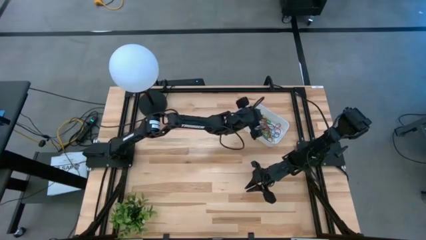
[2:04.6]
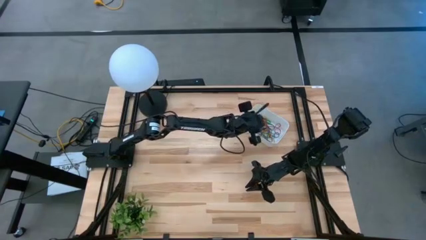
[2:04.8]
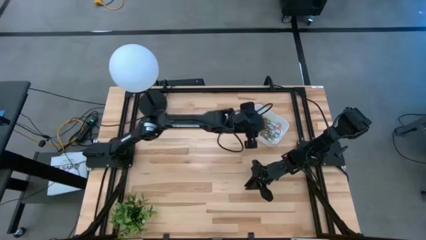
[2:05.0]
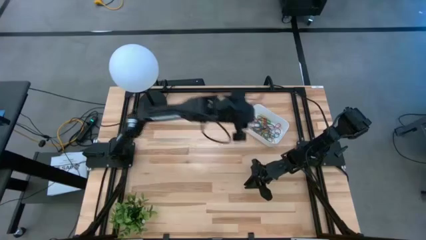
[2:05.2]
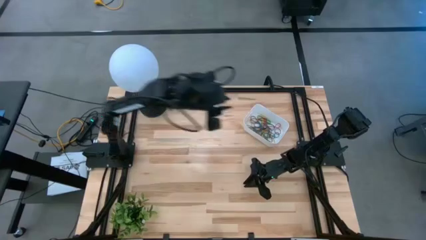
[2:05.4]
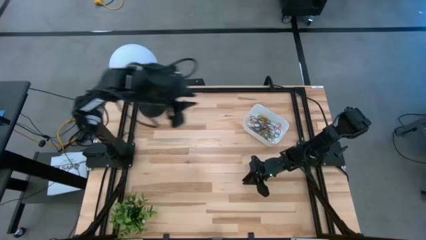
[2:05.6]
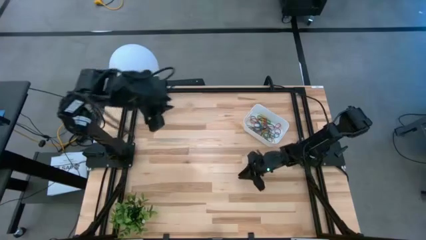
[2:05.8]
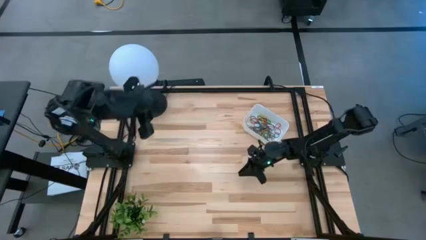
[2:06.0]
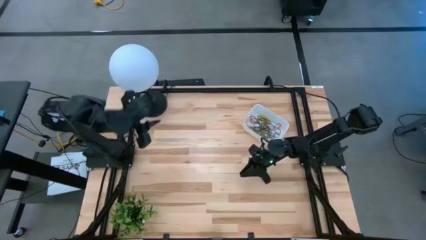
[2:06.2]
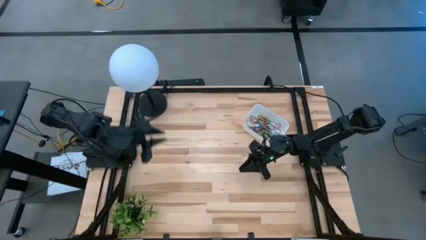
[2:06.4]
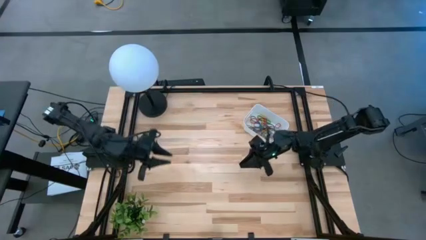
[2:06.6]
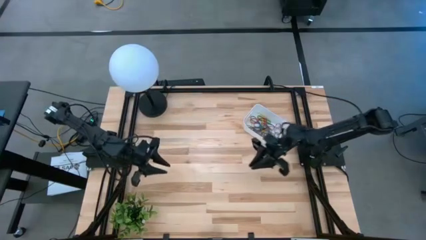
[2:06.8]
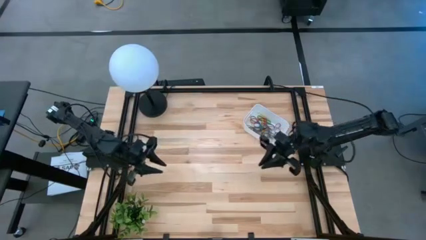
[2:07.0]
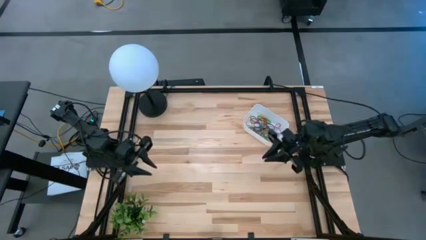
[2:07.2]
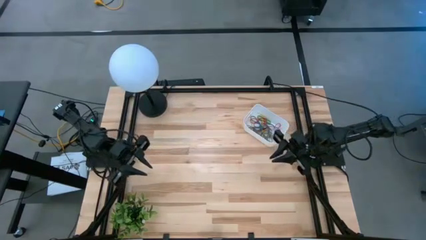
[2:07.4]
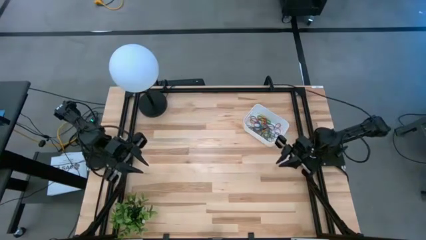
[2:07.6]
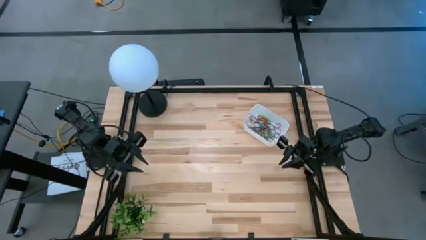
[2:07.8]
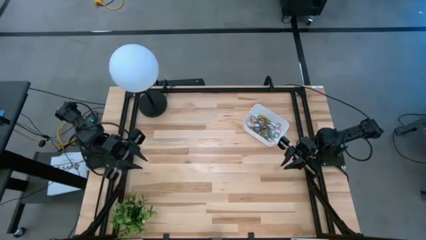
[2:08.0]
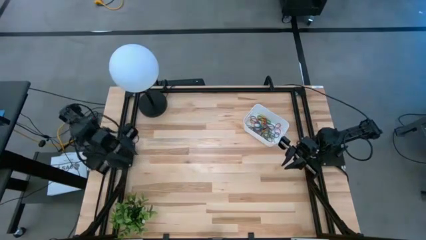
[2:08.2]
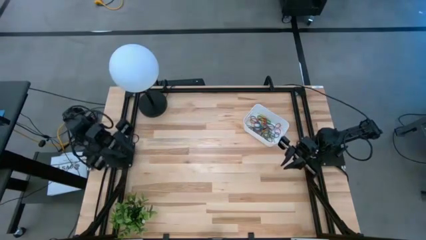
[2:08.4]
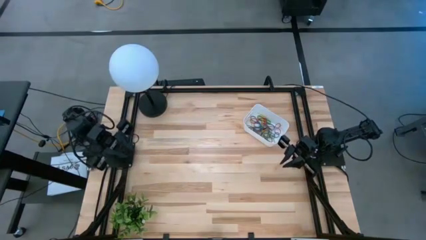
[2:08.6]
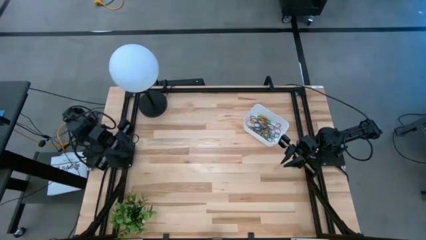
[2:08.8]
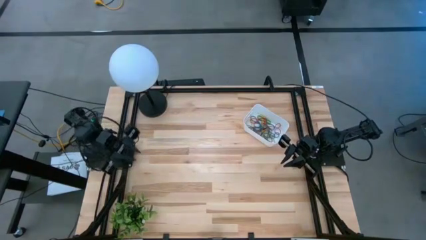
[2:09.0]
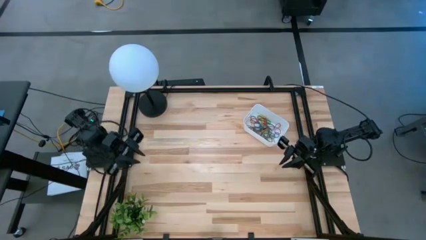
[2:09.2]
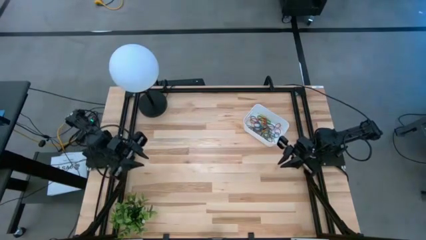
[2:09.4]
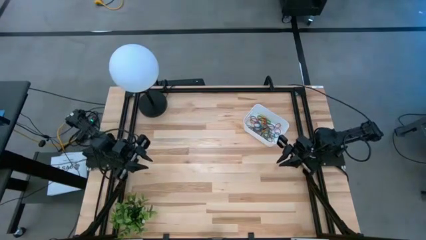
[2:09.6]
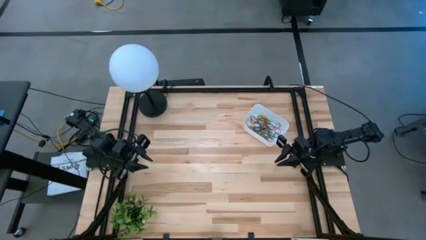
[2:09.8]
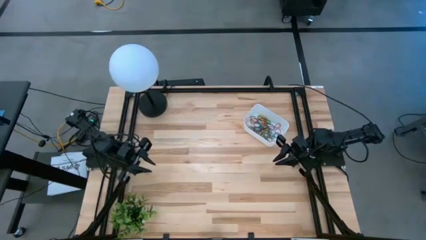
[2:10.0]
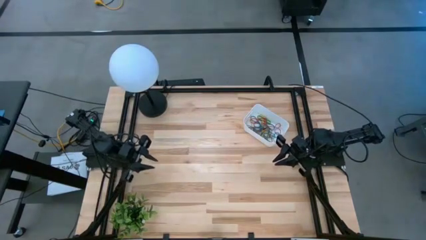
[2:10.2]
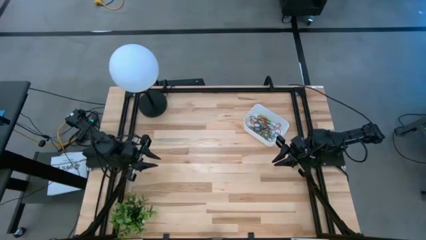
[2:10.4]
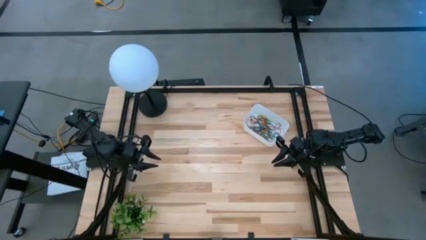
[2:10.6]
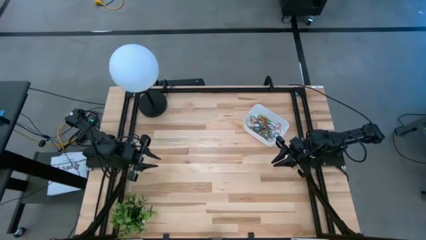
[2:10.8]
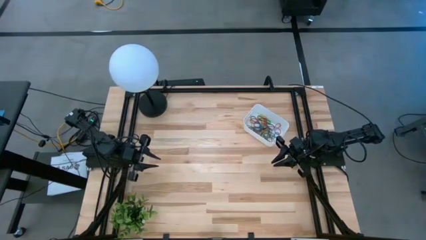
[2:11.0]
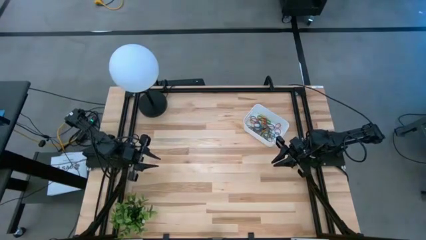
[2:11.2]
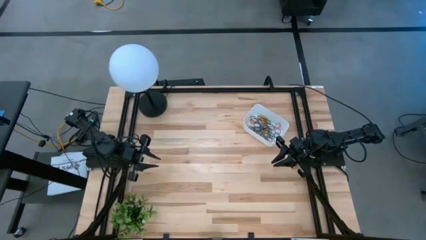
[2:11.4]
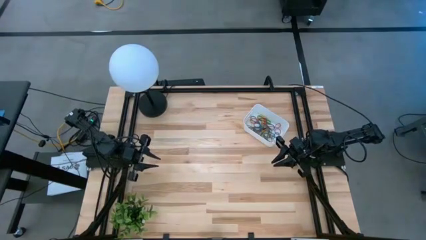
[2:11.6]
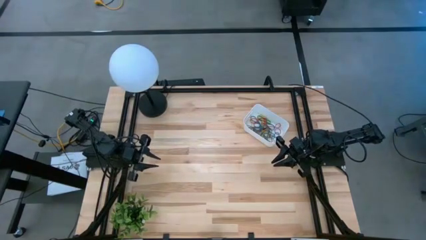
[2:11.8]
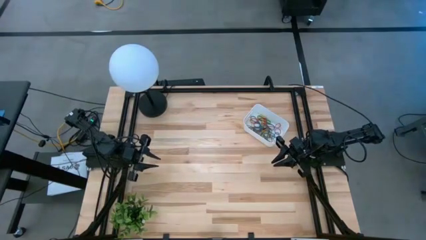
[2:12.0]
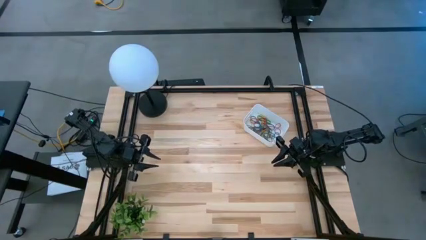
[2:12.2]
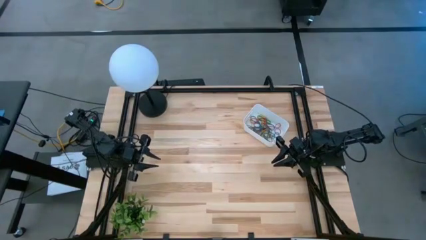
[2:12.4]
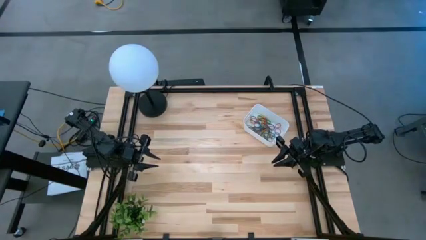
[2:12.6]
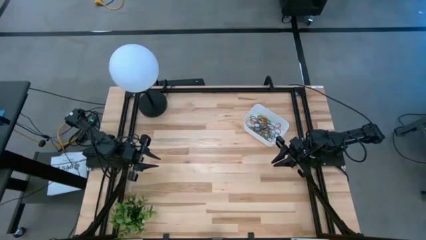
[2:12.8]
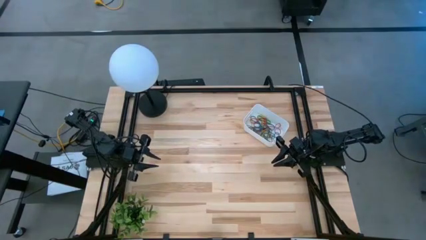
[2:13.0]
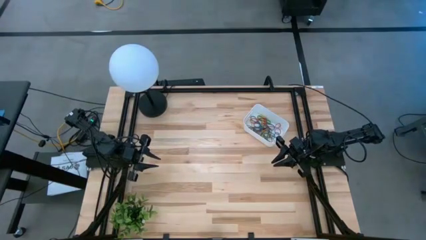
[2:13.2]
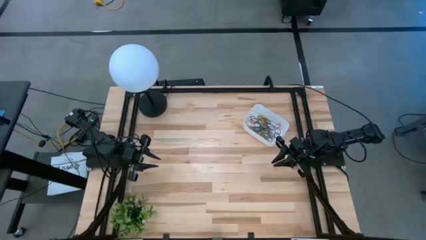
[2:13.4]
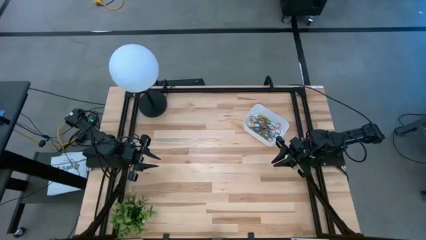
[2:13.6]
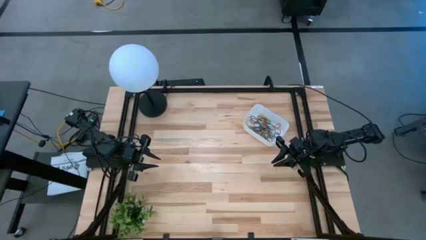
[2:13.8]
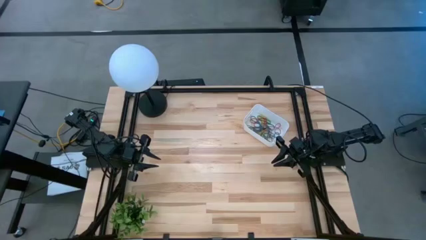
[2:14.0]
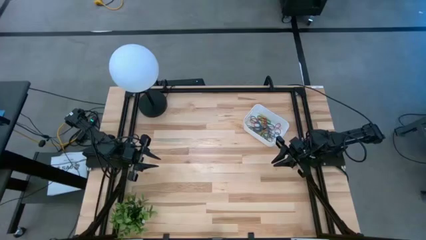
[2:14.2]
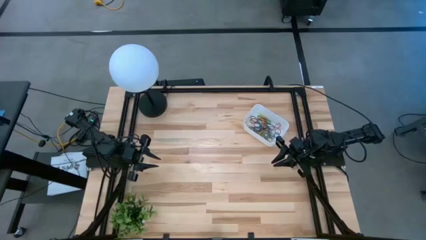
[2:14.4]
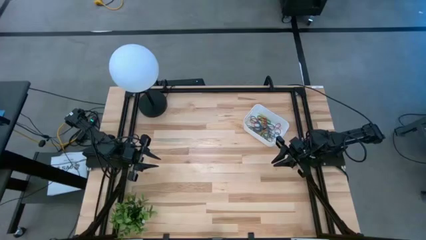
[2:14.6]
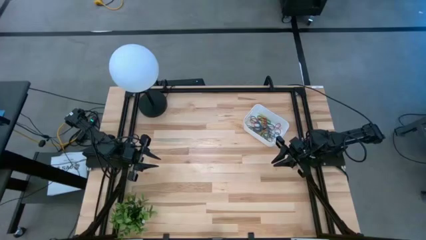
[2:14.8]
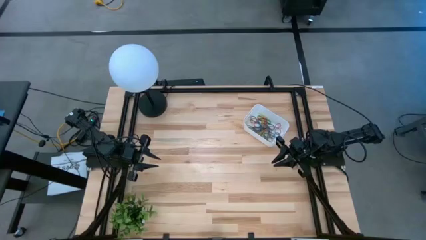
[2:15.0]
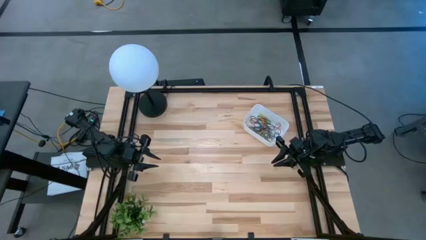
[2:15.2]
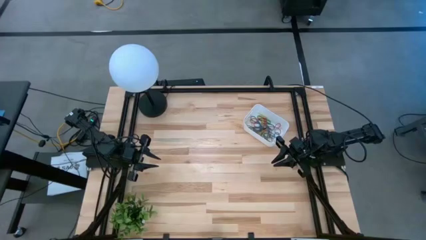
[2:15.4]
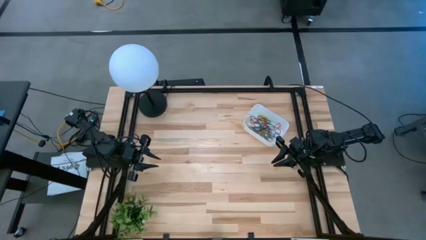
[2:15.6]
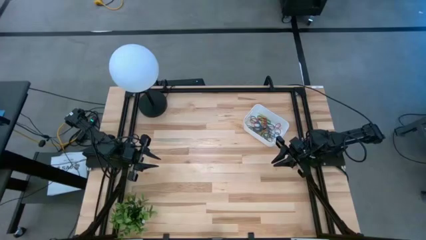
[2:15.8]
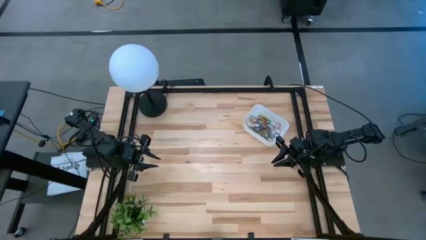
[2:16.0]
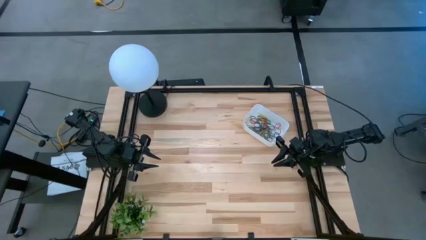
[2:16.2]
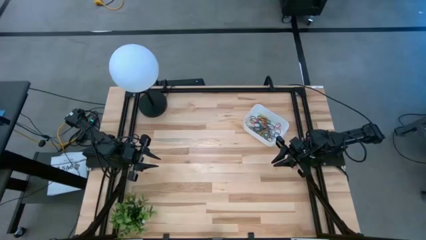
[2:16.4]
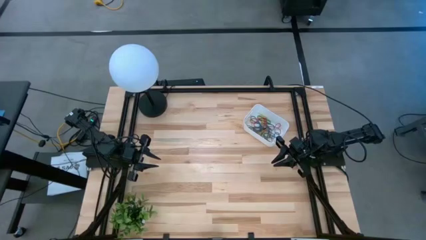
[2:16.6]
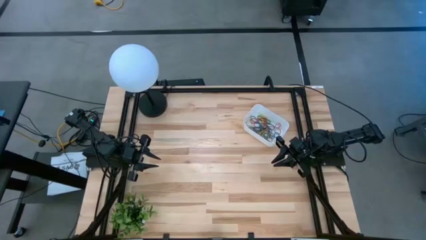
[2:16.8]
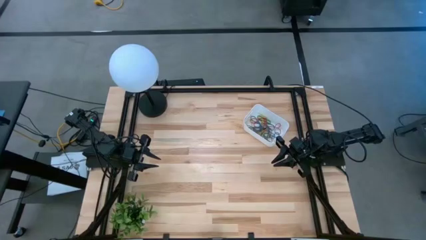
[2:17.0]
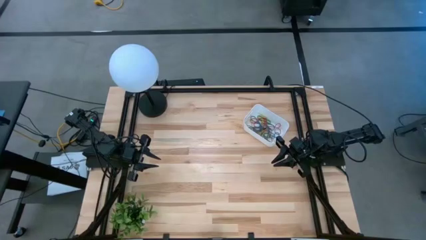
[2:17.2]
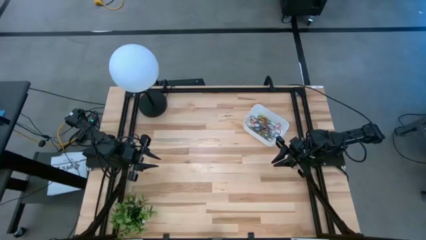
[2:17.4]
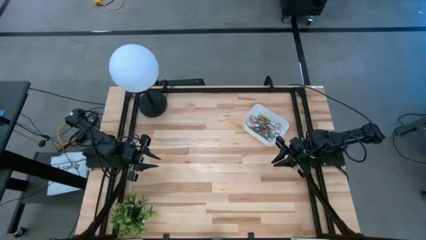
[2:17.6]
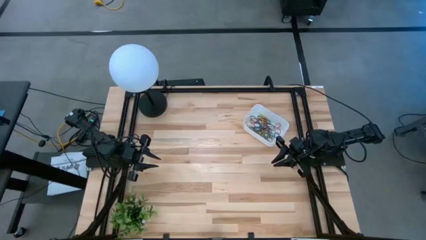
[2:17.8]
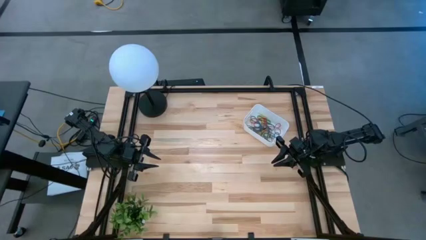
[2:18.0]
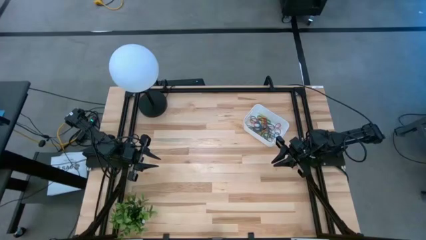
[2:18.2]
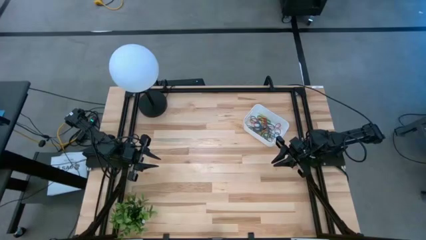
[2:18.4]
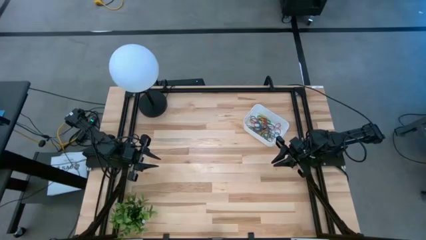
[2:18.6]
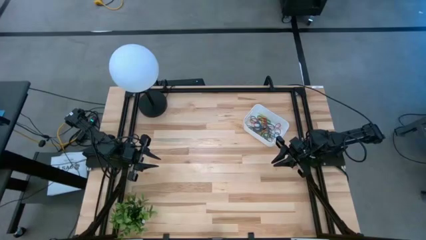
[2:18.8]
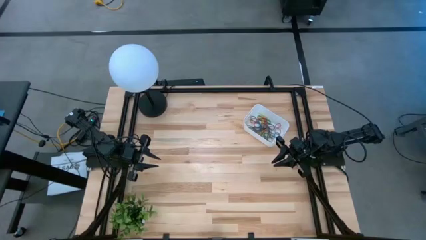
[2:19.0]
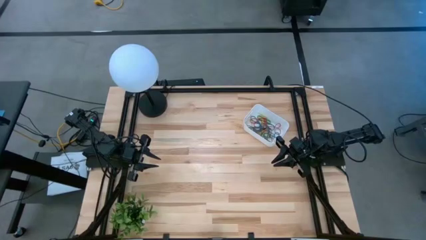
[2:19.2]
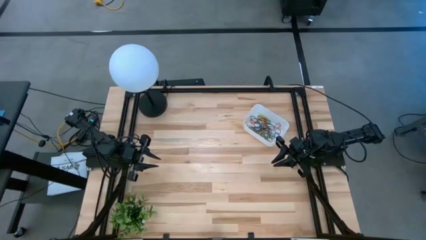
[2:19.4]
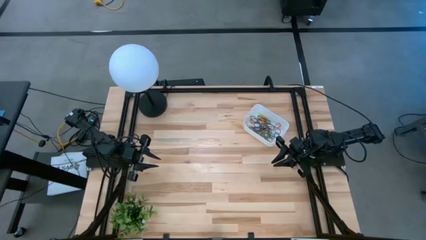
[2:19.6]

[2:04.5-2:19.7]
Task: Pick and place items into bin
Return to Home Position

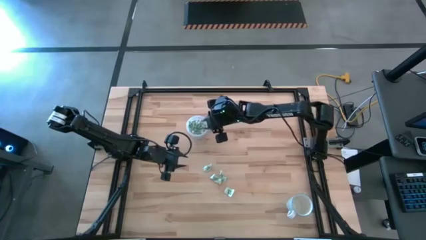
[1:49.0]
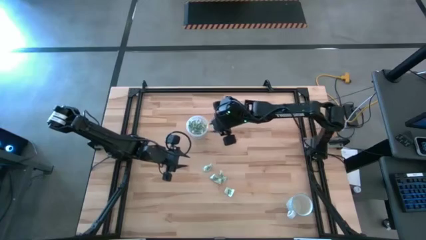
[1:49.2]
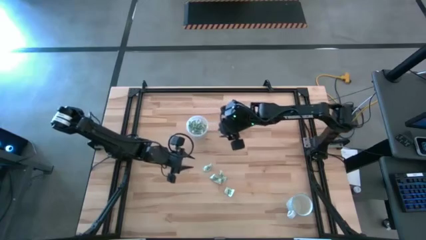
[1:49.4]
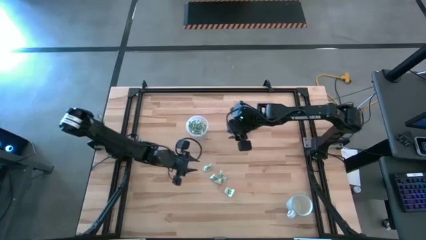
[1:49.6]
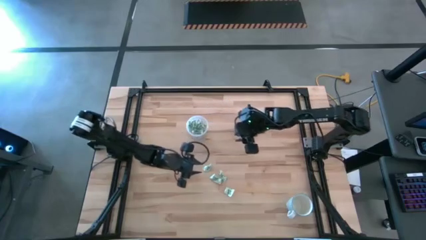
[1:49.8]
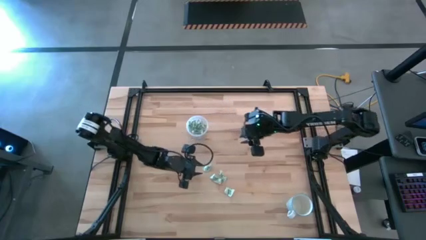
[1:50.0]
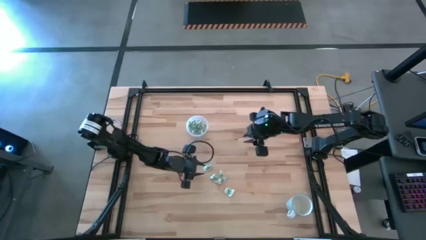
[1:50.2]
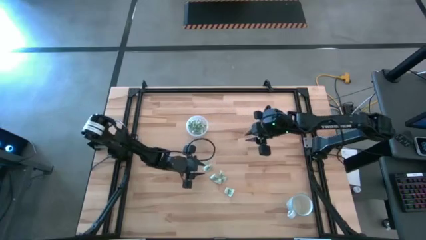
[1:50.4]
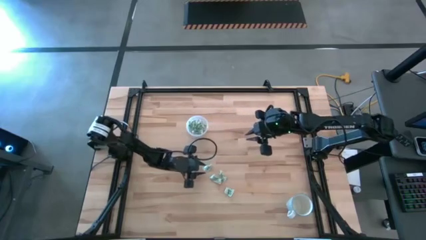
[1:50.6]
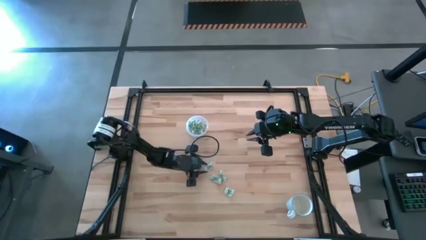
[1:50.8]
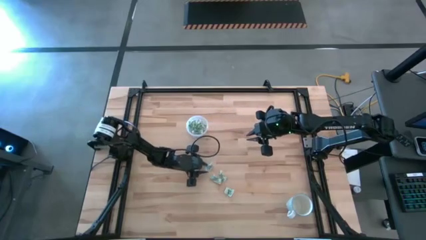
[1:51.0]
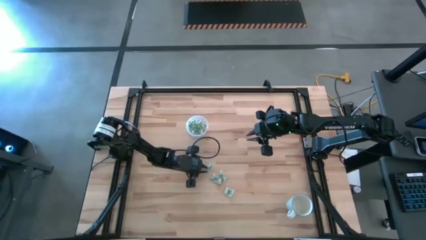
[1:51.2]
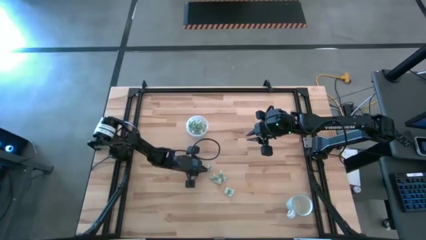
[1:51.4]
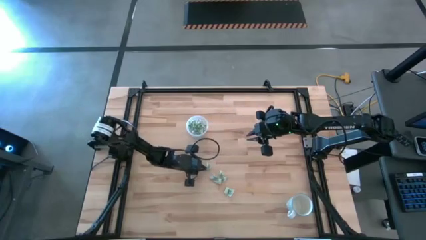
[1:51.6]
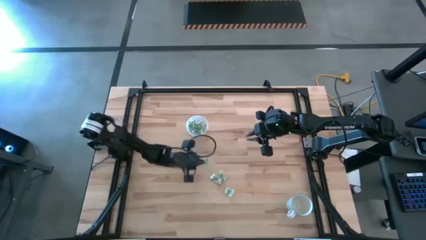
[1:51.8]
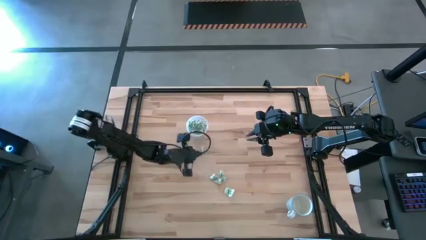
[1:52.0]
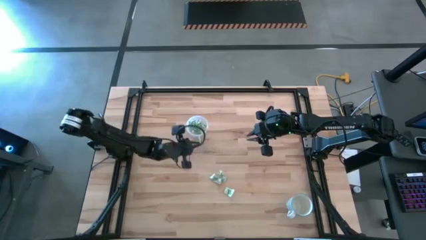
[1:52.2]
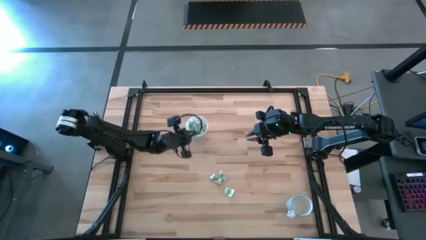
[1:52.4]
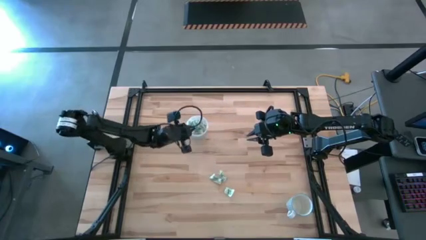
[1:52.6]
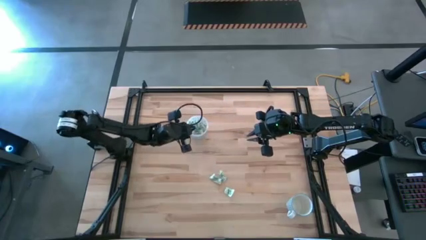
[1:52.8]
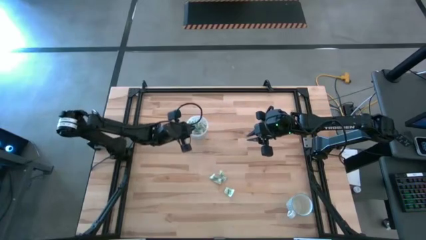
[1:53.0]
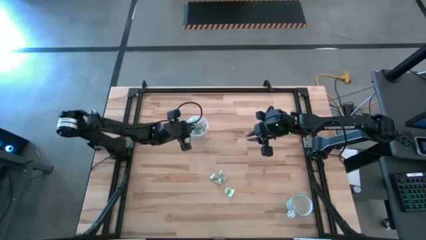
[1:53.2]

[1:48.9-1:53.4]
Task: Pick and place Stevia / Truvia into bins
Put the stevia packet into the transparent container
